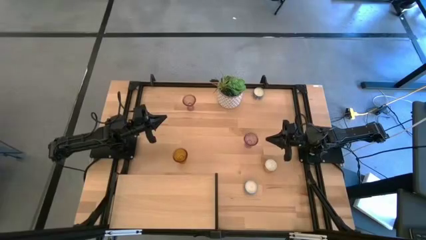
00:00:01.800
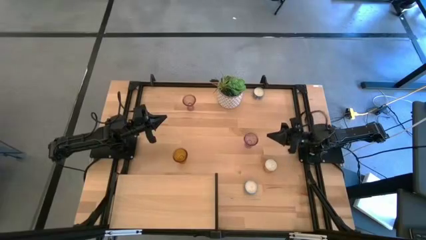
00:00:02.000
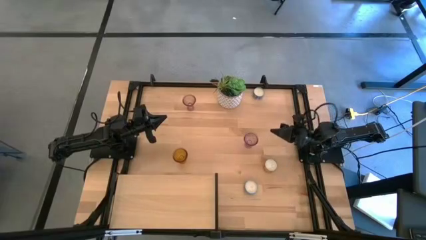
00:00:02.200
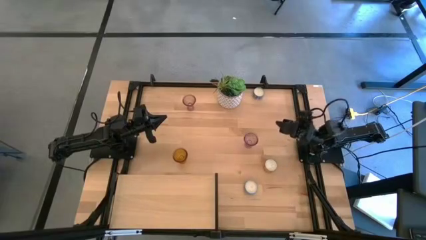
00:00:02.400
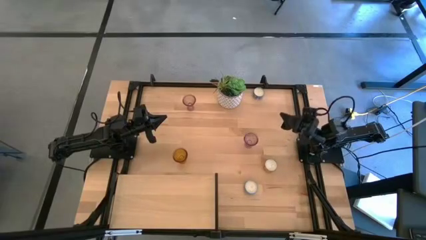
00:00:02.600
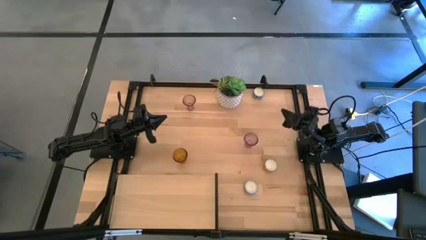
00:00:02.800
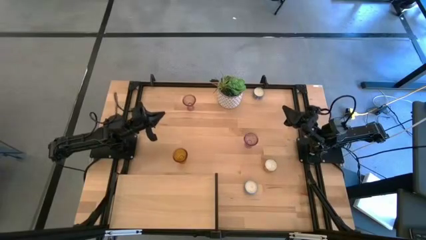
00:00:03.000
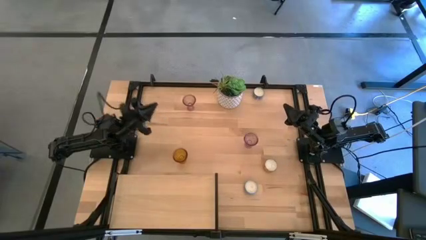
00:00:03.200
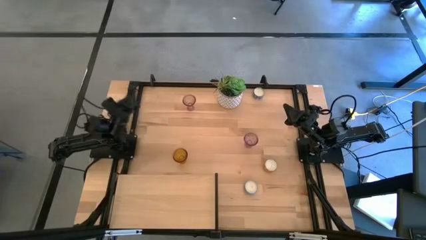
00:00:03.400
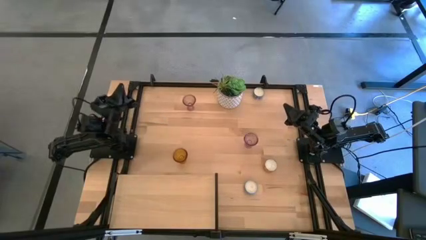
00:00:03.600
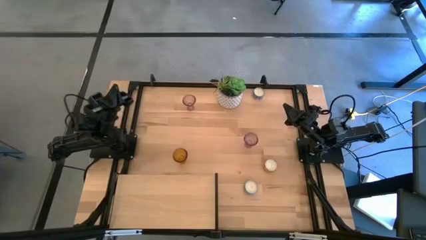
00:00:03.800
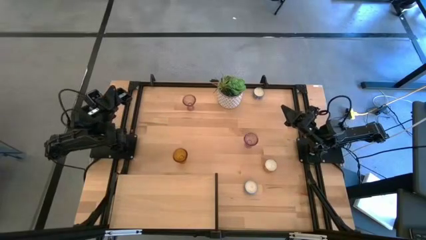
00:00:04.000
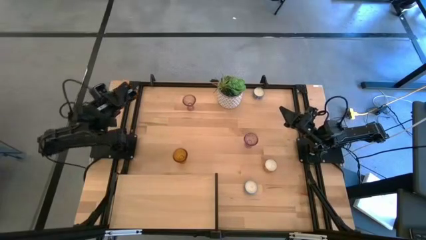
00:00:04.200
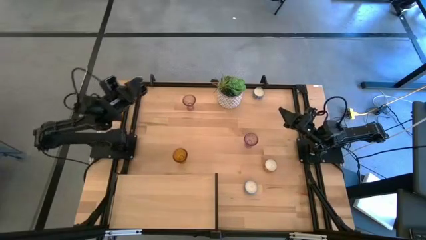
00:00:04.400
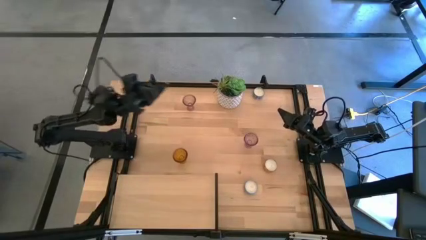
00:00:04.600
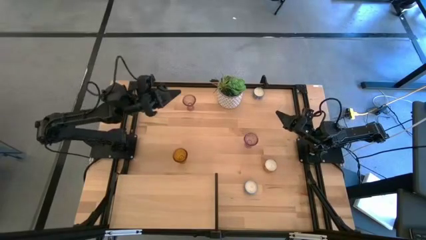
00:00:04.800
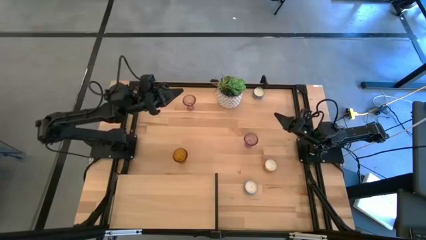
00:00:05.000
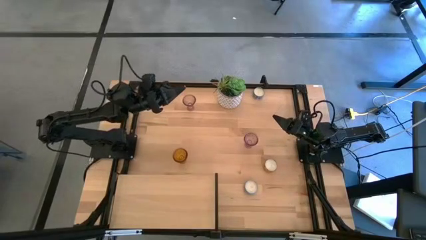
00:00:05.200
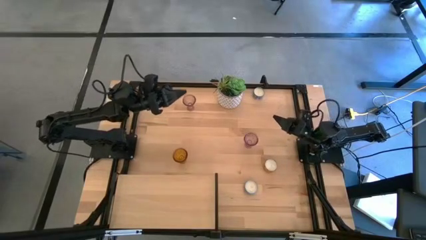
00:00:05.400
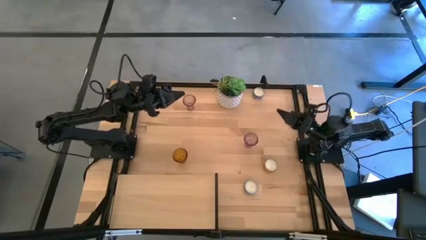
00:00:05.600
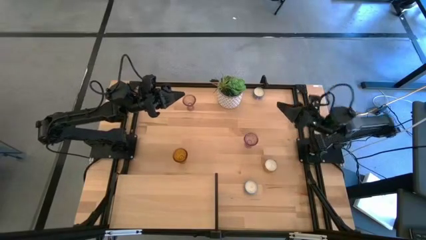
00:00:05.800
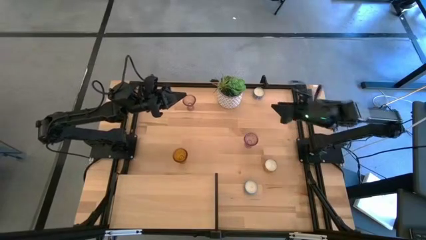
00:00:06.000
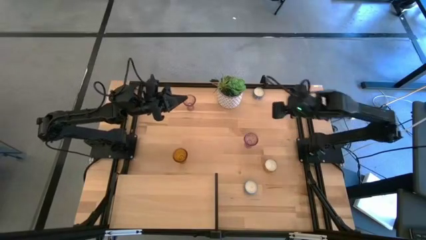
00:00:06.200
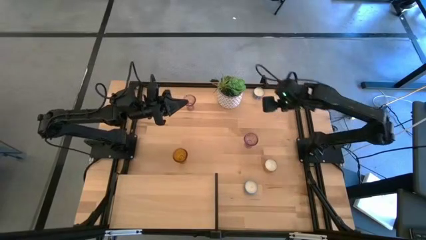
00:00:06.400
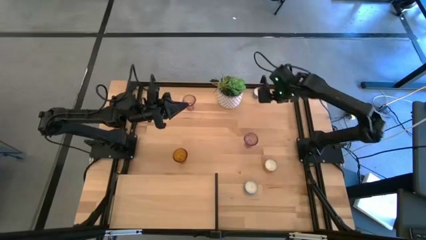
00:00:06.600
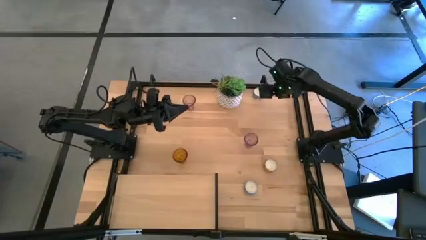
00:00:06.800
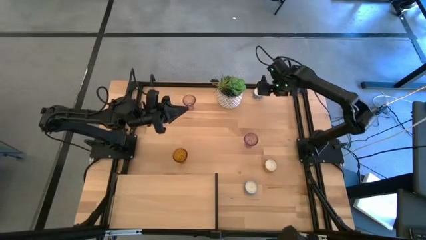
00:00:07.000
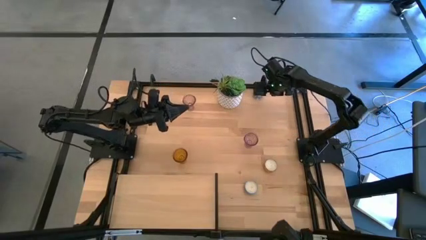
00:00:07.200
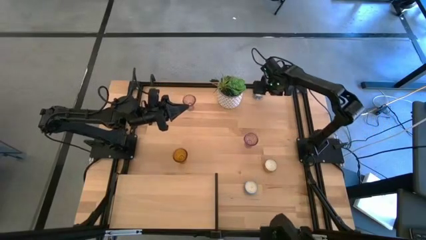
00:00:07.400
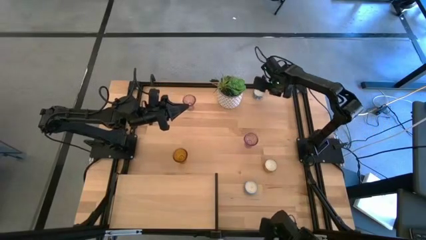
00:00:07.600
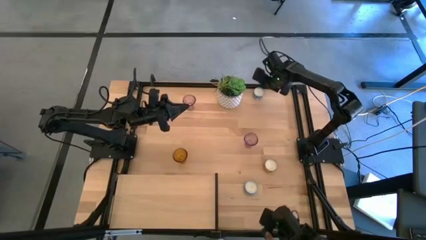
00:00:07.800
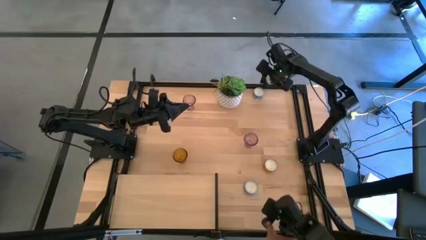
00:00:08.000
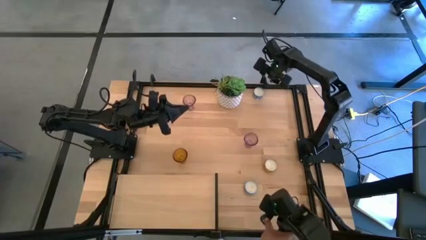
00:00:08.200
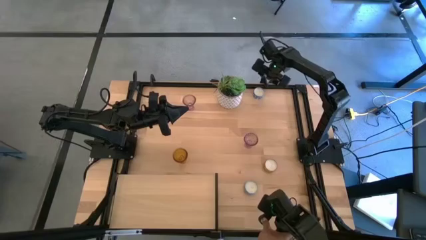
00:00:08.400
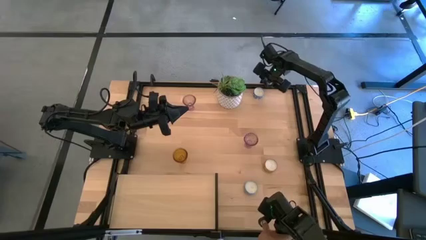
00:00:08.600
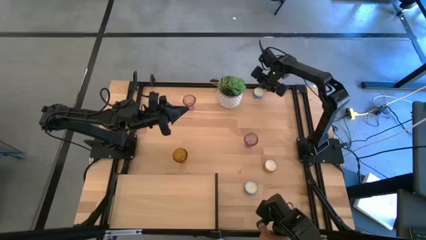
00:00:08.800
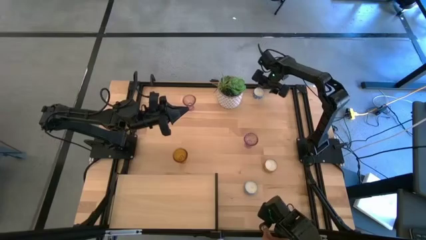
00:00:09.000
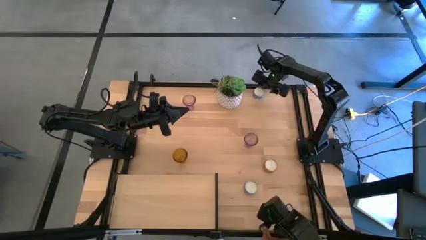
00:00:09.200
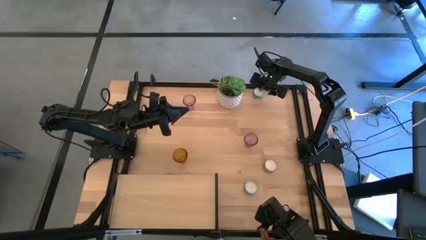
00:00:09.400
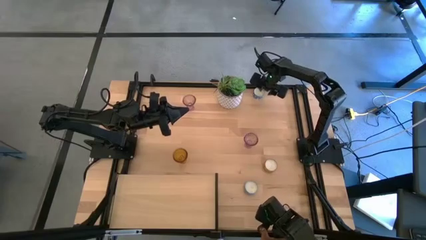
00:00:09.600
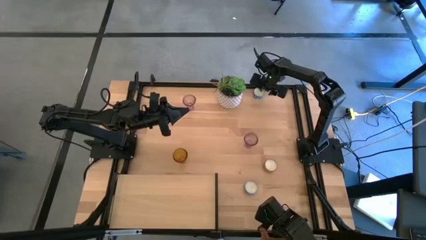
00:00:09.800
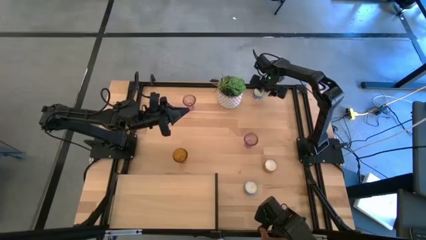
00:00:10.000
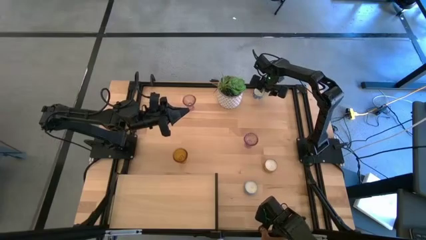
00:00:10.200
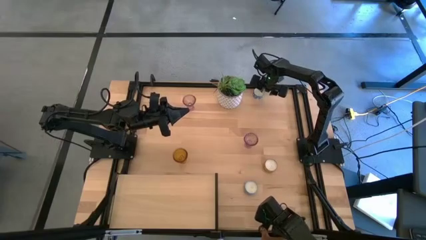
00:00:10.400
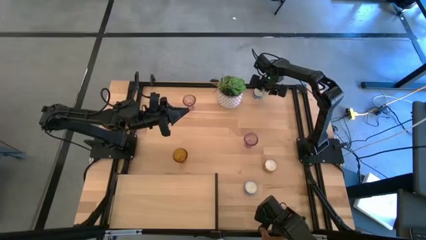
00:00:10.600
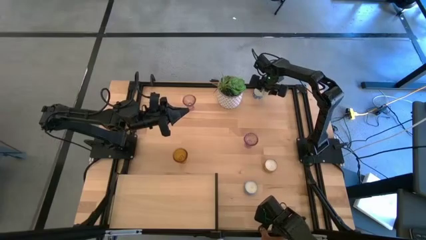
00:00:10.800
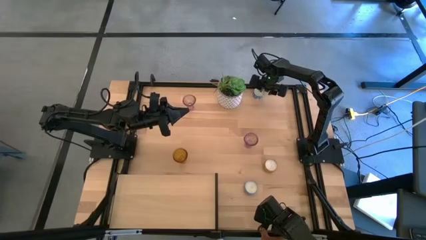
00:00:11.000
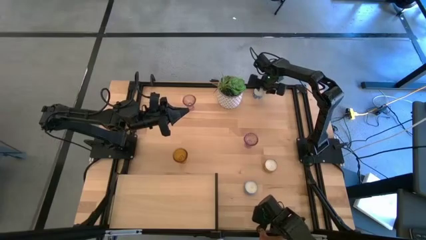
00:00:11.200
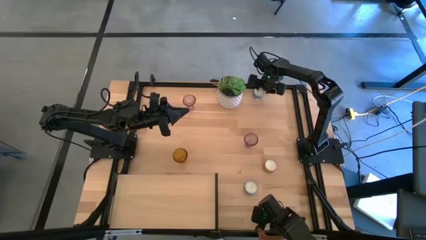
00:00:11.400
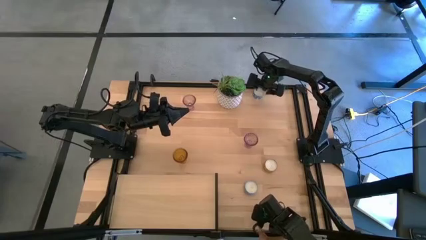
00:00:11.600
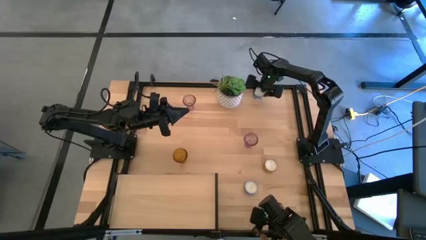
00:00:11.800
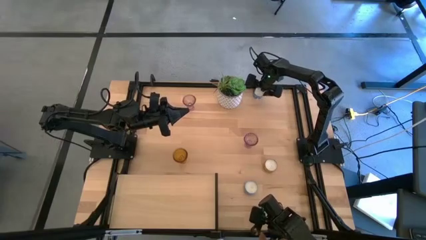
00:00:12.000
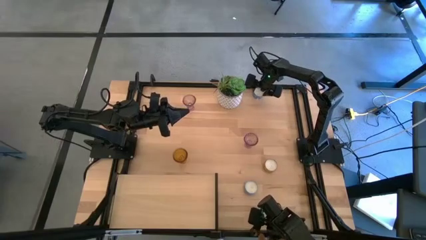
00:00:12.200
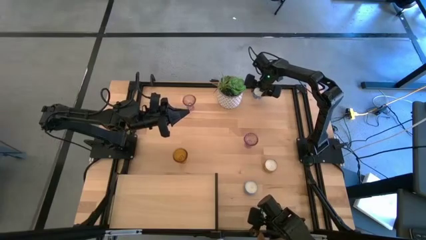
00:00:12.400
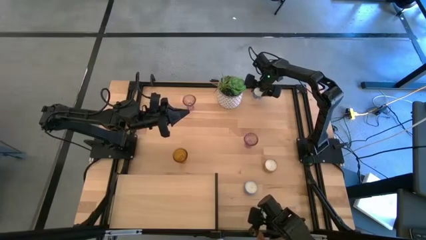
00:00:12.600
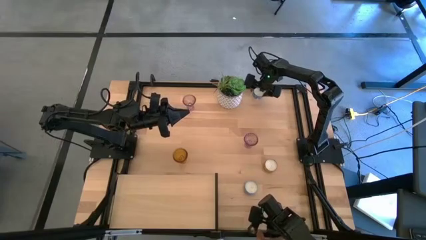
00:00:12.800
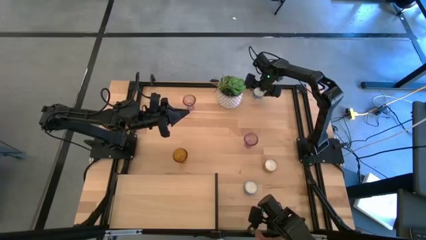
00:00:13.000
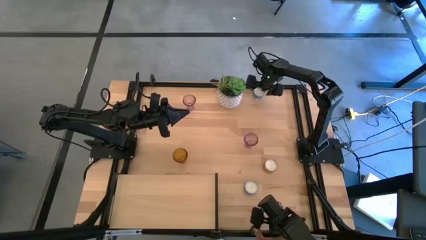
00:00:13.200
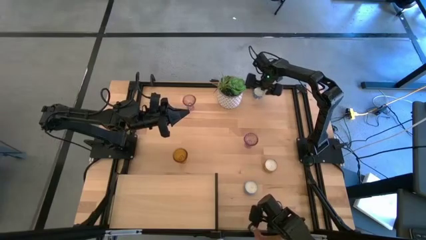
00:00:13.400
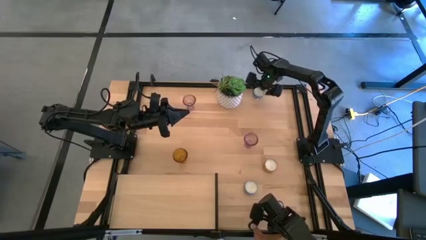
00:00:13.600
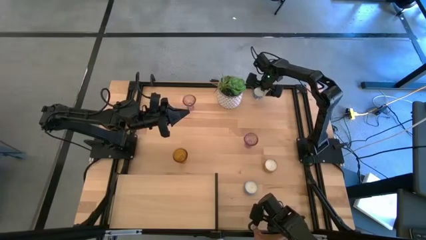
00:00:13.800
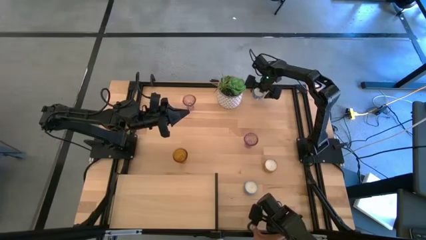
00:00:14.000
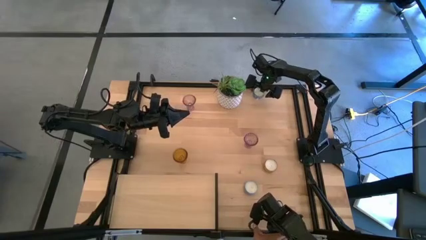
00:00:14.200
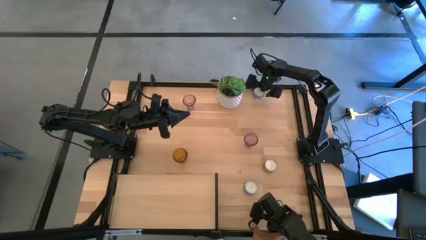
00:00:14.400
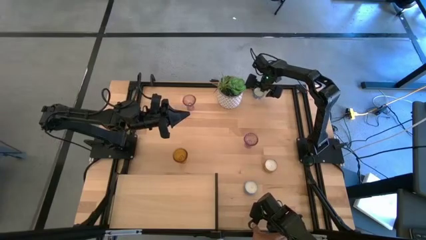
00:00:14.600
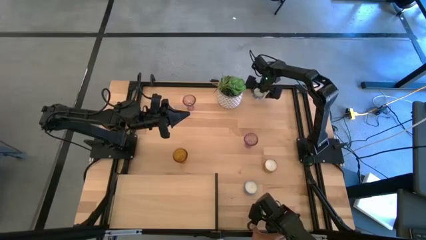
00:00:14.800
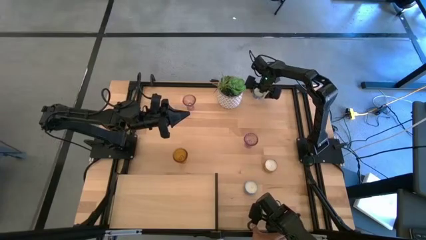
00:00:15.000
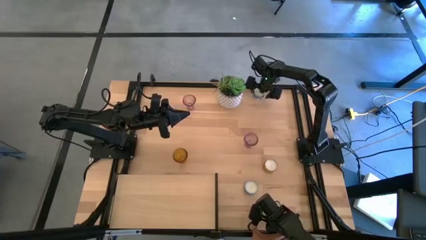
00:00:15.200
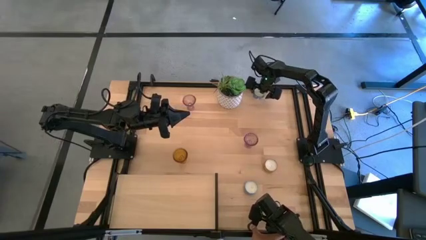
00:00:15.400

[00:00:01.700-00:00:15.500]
Task: Pick & Place candle stick holders
Put the top blue scented candle on the shelf
